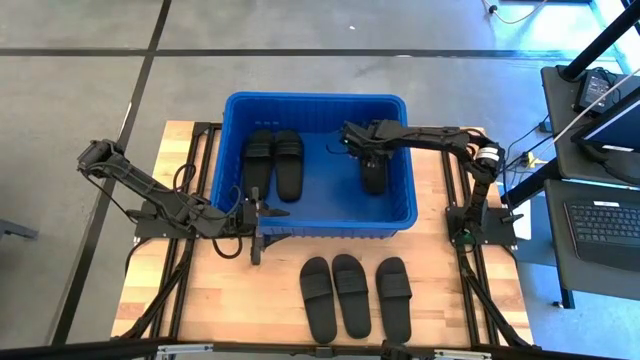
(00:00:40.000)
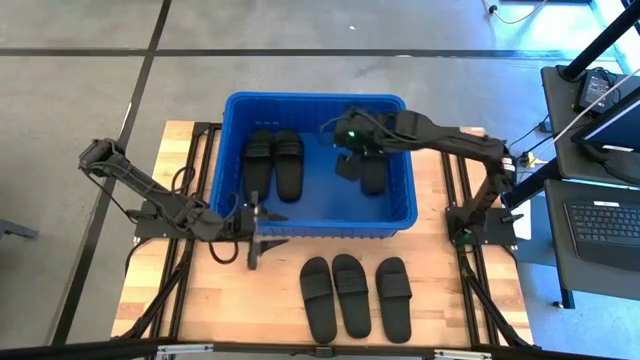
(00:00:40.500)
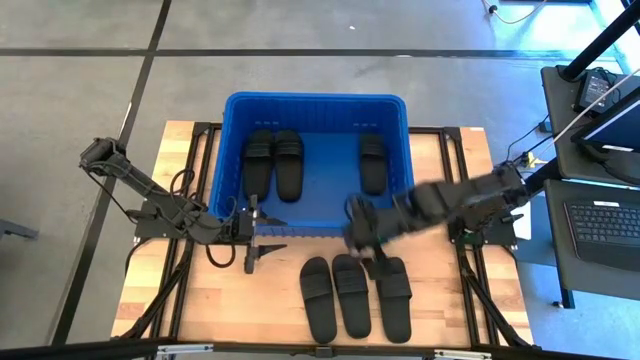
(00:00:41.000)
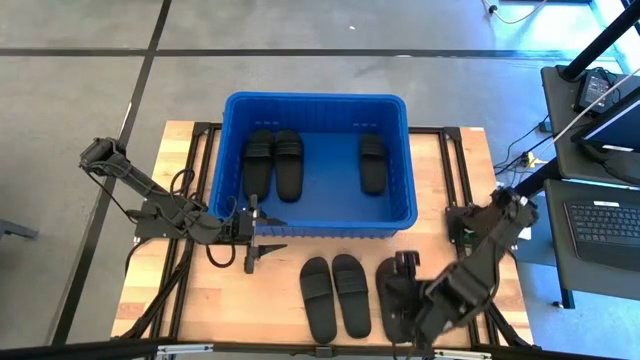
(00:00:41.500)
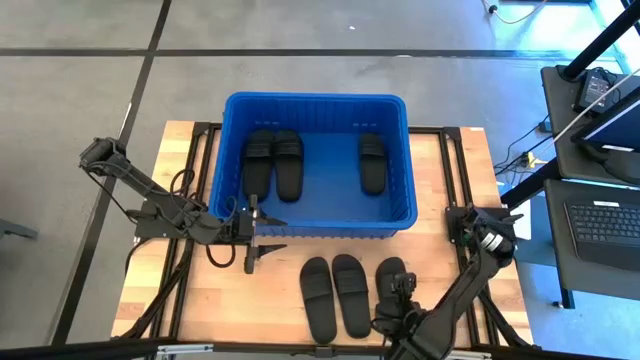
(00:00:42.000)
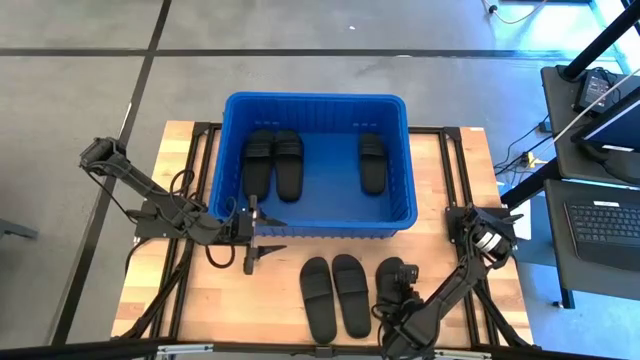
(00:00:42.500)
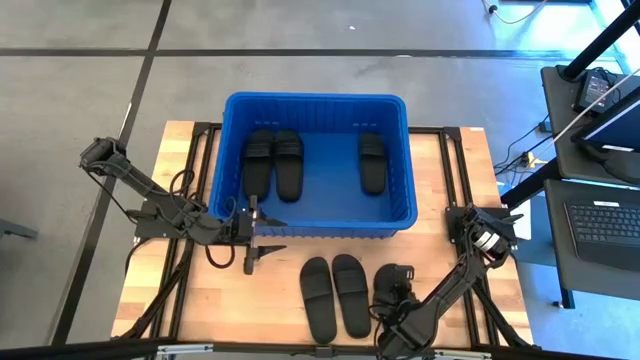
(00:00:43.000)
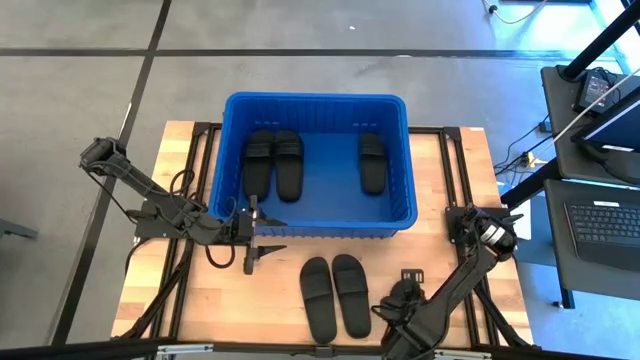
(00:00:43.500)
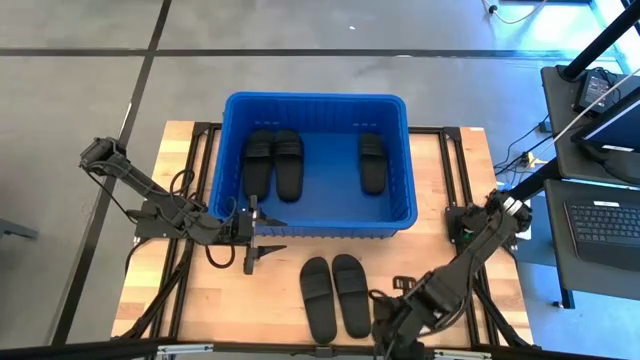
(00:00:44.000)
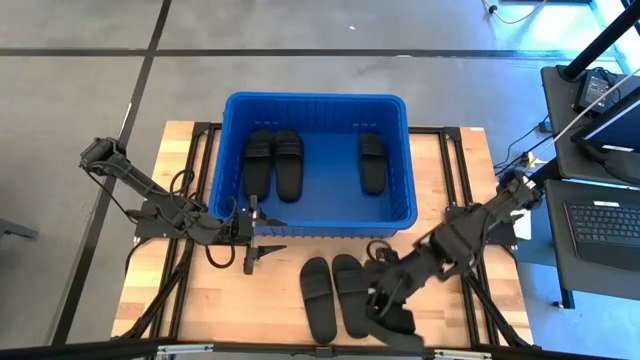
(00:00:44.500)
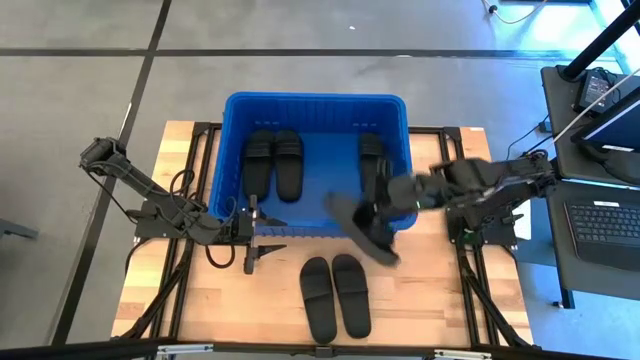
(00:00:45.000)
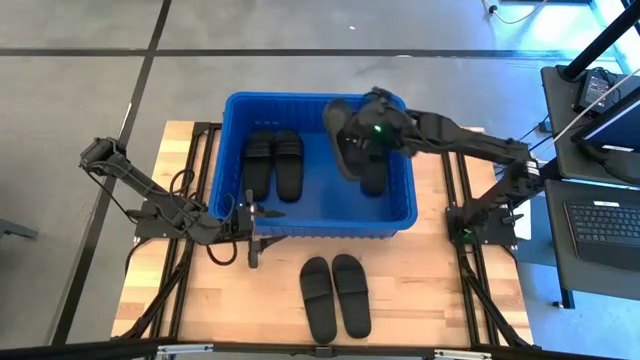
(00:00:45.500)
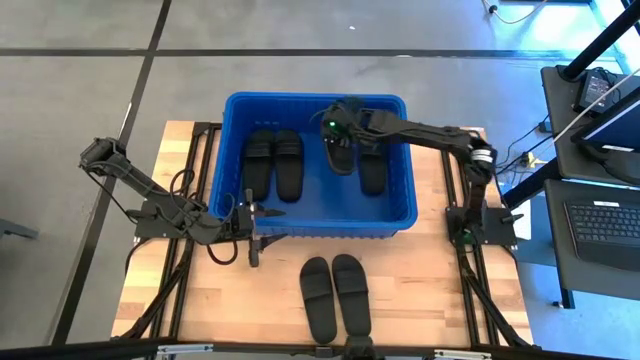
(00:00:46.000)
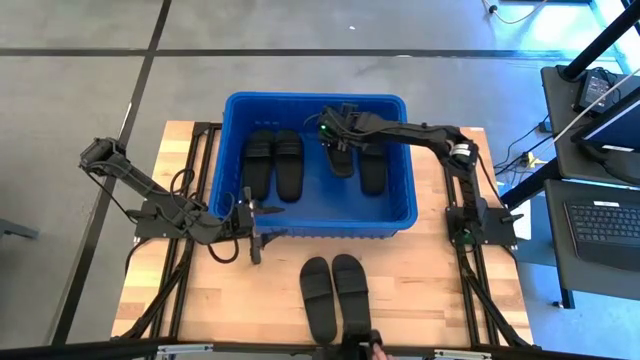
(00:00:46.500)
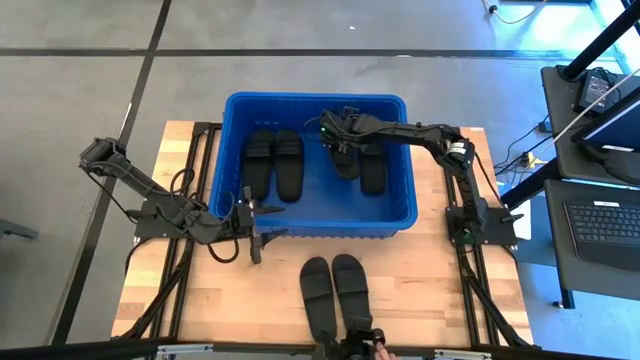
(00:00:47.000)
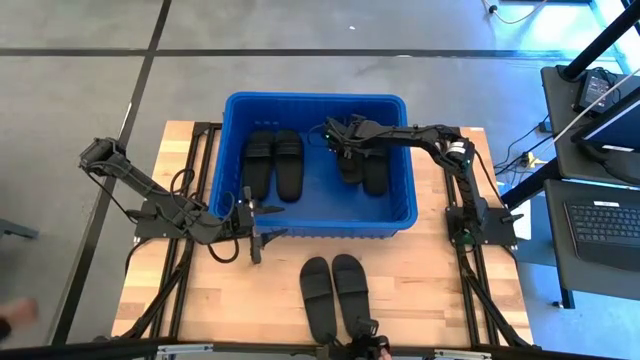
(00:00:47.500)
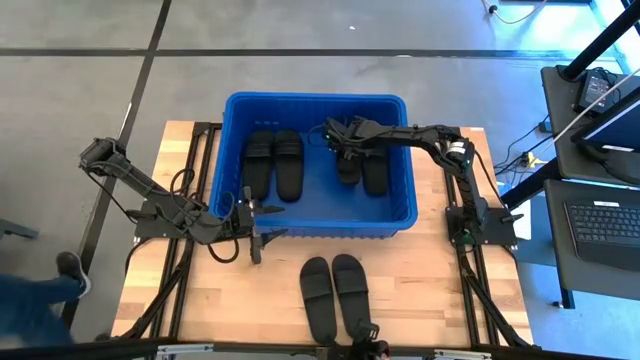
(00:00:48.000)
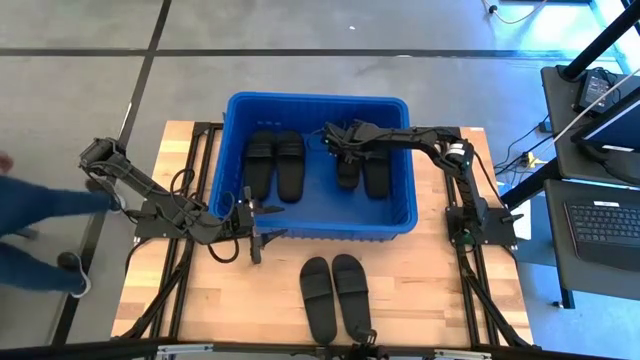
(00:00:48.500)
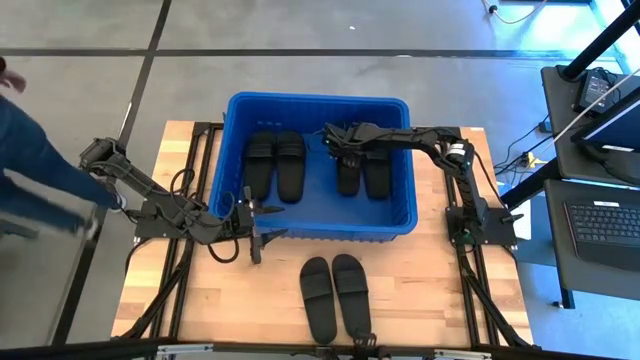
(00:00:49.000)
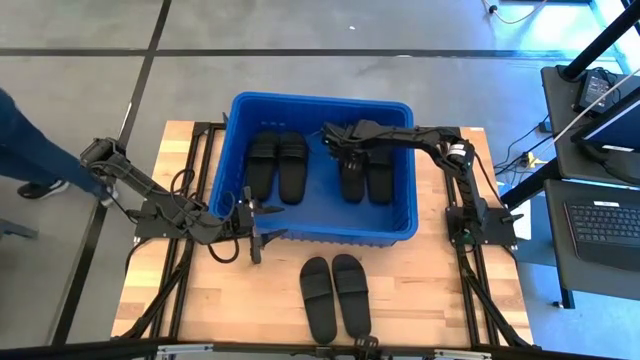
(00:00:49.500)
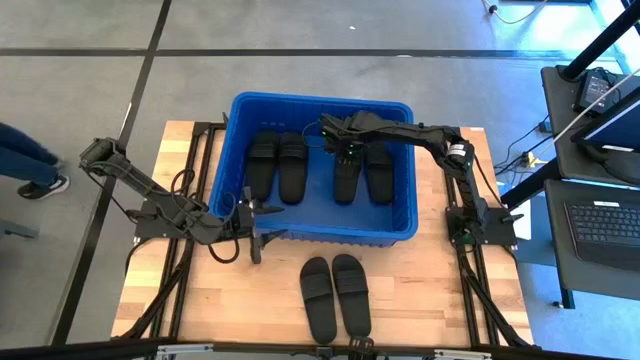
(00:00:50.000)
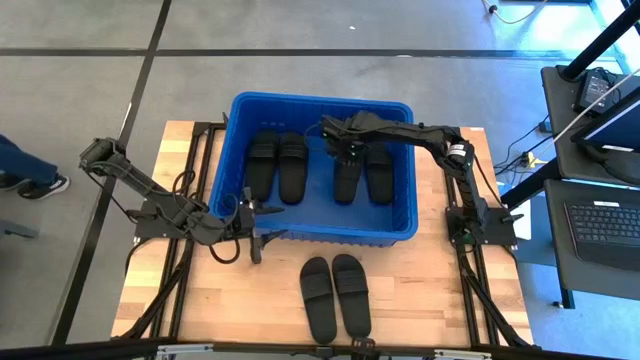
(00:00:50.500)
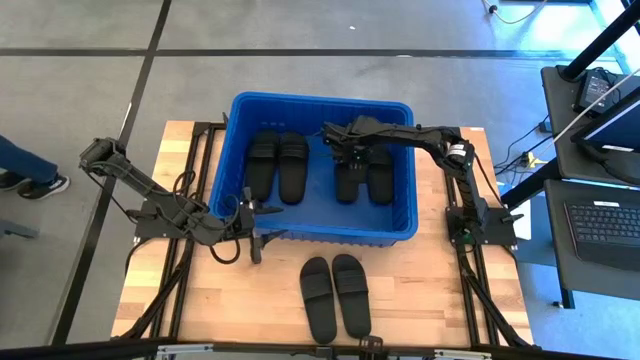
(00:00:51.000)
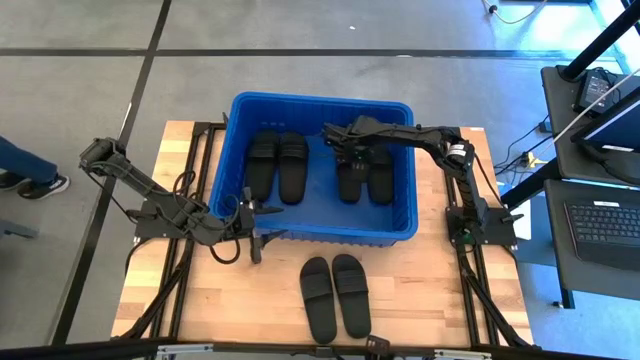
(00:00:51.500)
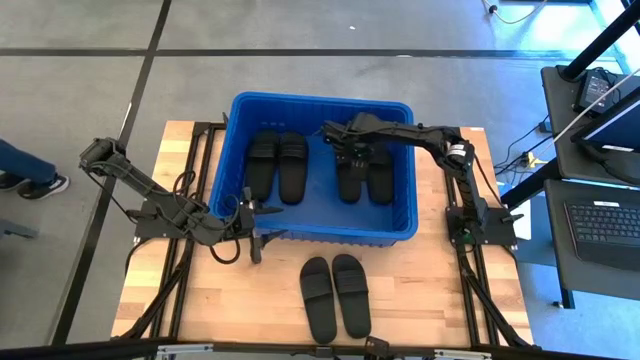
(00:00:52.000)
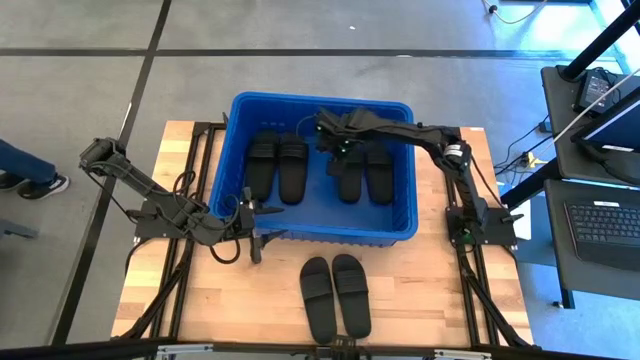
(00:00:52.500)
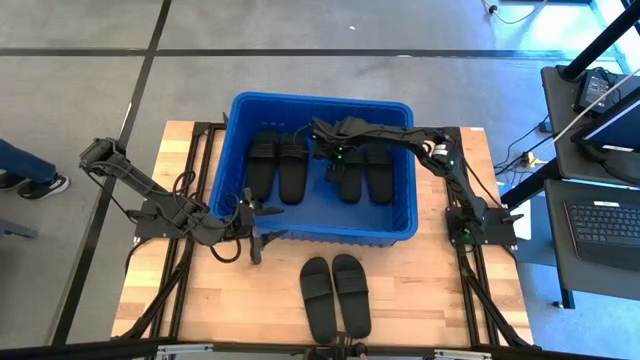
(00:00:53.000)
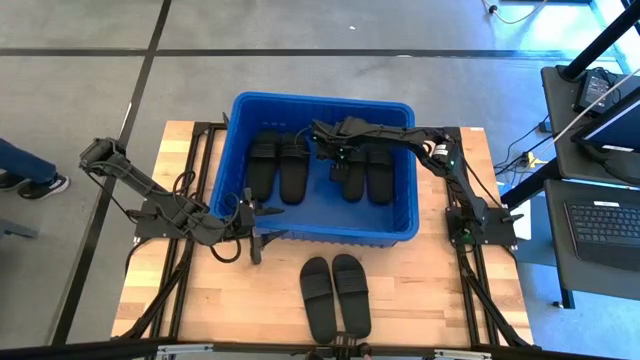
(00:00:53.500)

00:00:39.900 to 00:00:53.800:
Task: Pick and place slides into bin
Put the black slide into the blue bin

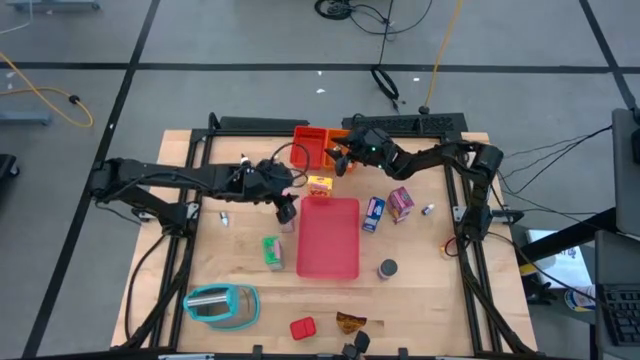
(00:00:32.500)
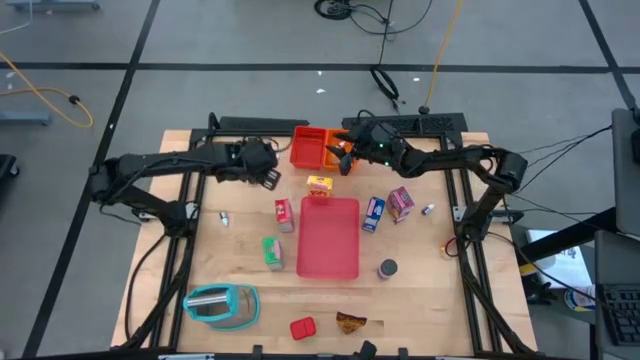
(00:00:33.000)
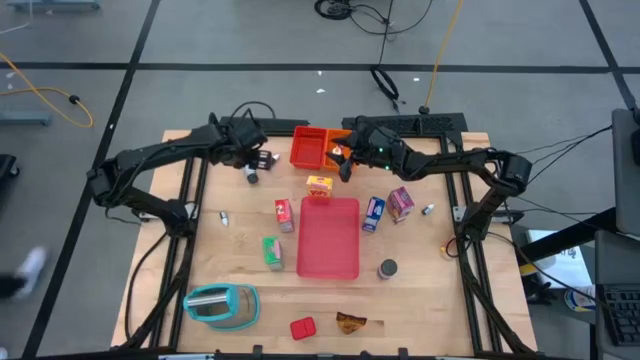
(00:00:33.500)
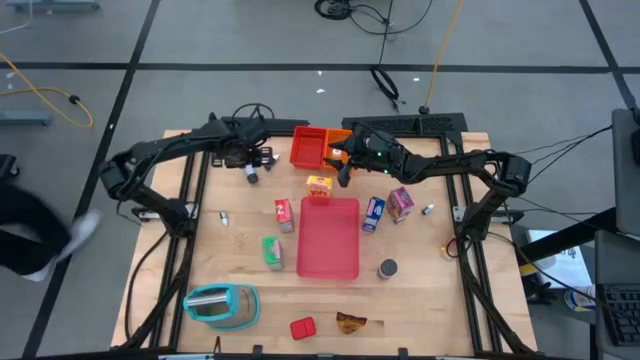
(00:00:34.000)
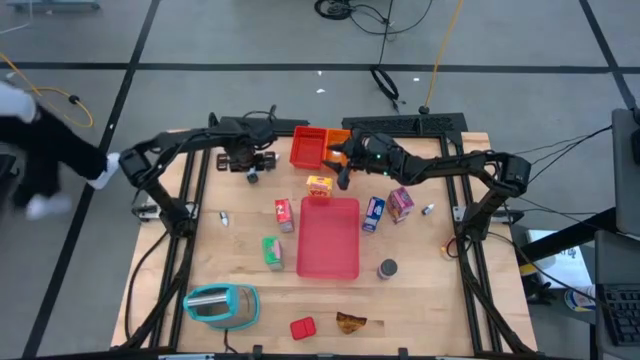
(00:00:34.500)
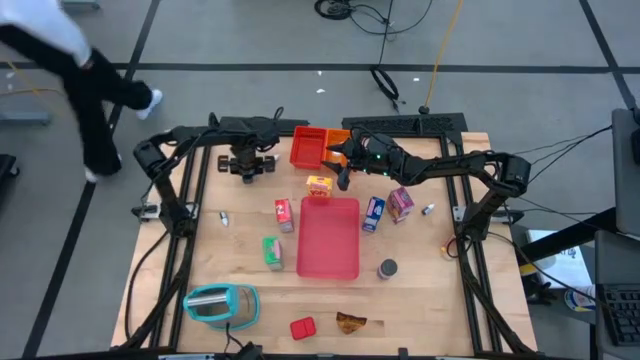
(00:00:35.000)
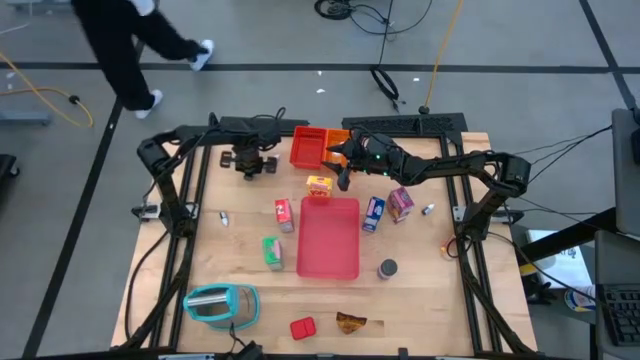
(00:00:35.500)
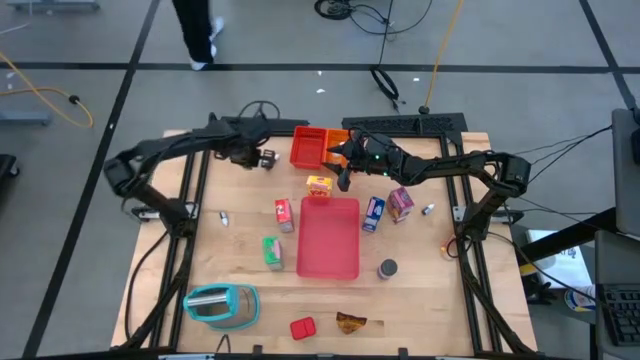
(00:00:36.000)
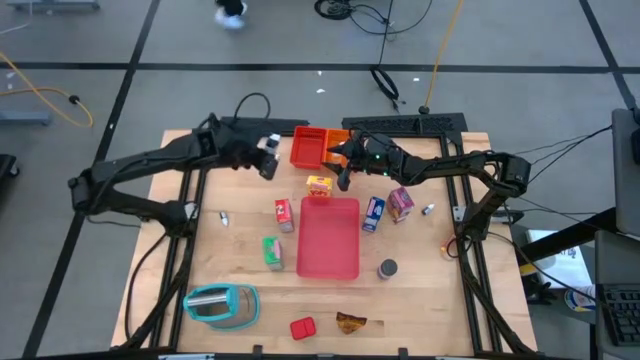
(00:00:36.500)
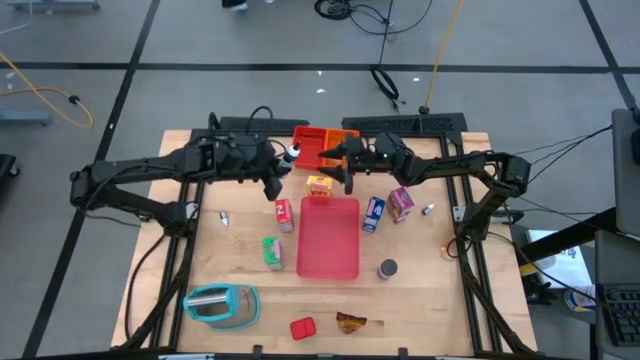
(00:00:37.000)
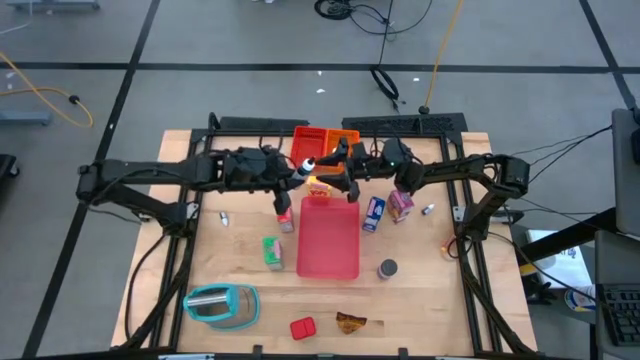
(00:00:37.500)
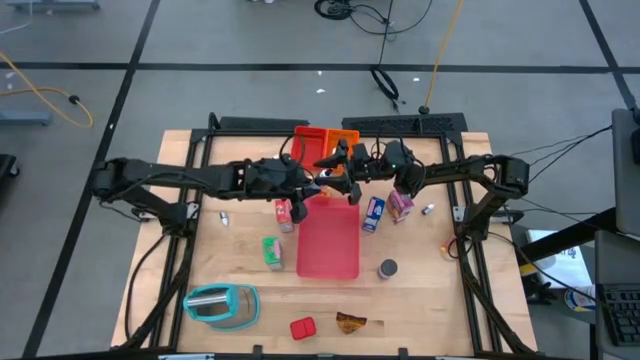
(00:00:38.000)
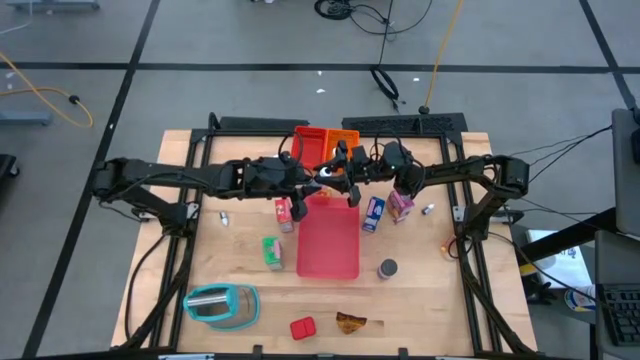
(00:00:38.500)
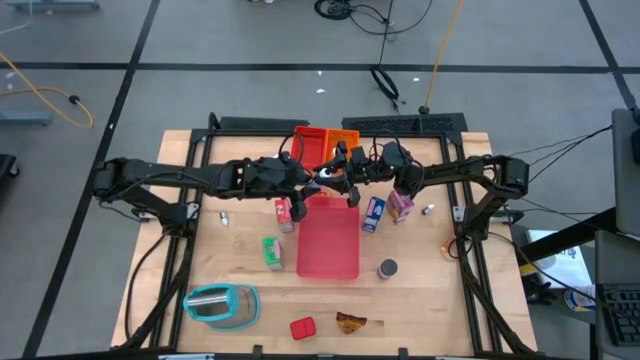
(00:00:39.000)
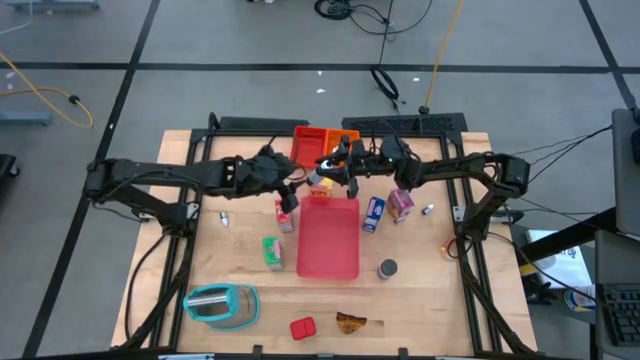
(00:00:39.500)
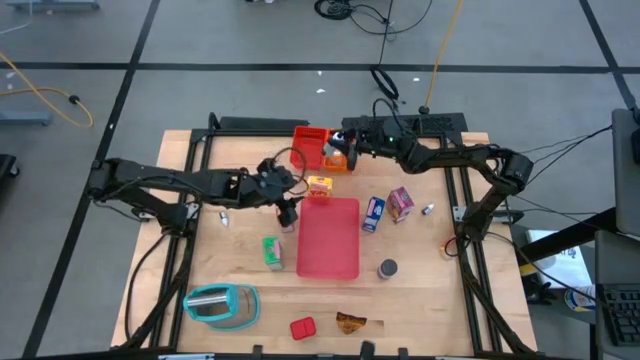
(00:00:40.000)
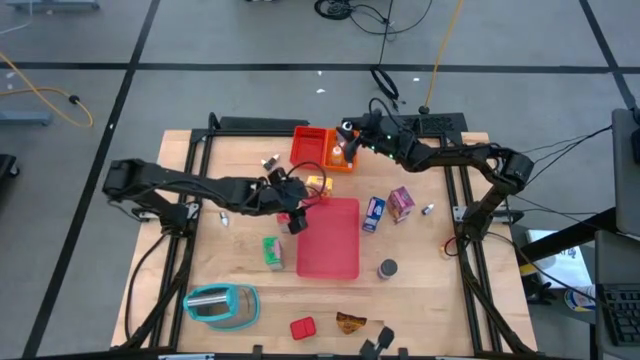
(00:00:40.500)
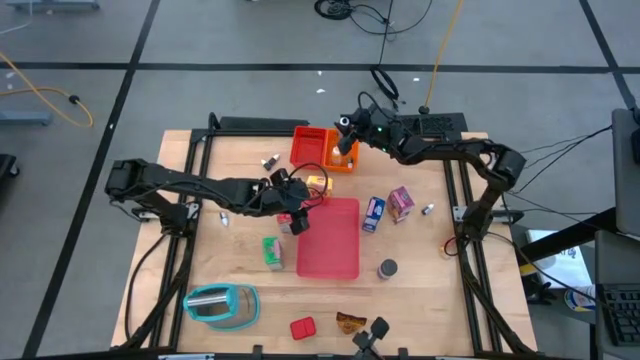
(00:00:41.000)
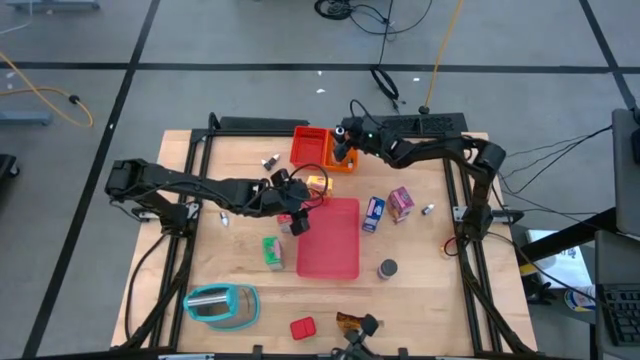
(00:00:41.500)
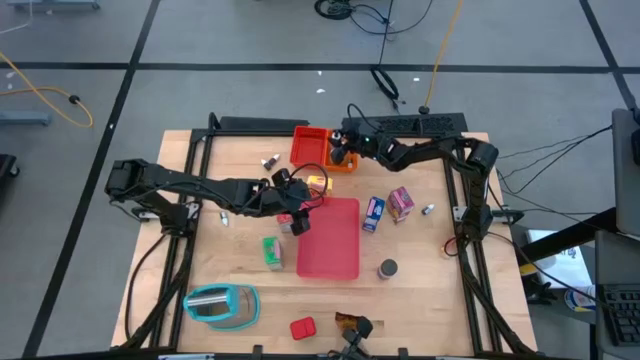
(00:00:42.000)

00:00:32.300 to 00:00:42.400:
Task: Pick & Place Kitchen Items
Put the large black food coloring bottle into the orange basket
